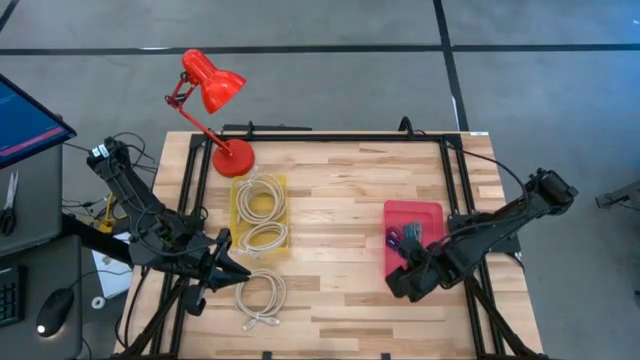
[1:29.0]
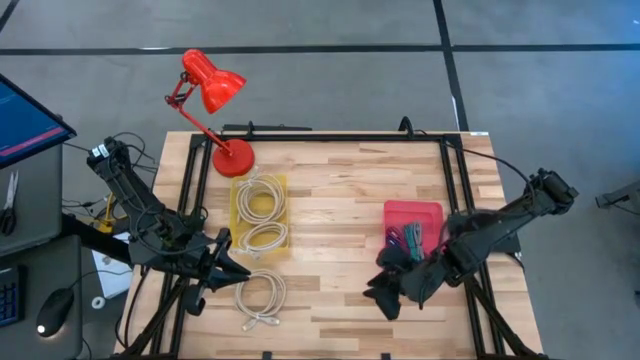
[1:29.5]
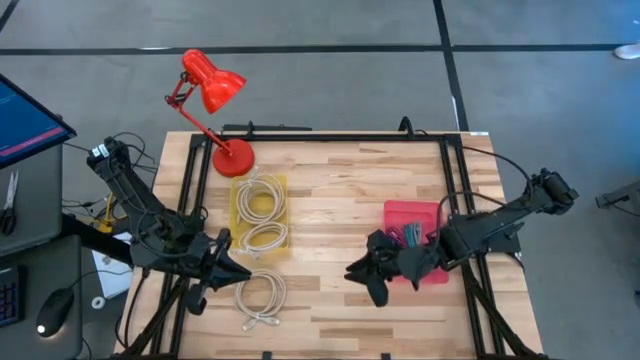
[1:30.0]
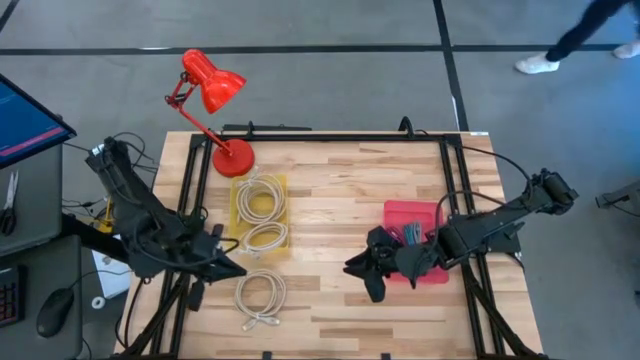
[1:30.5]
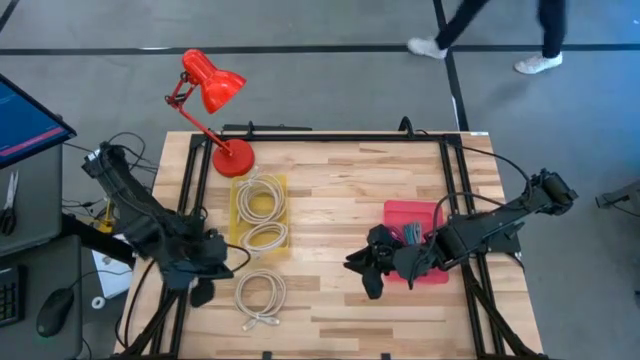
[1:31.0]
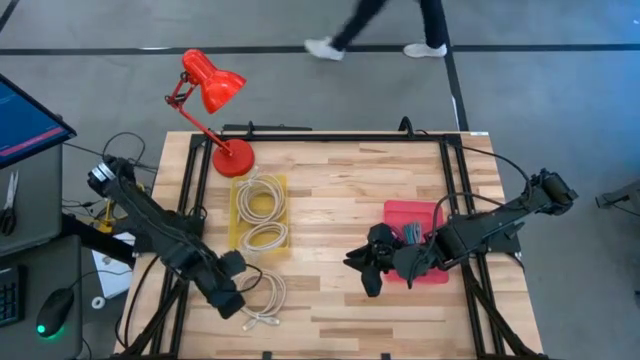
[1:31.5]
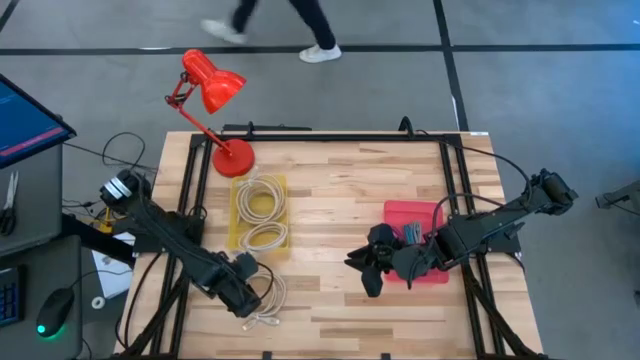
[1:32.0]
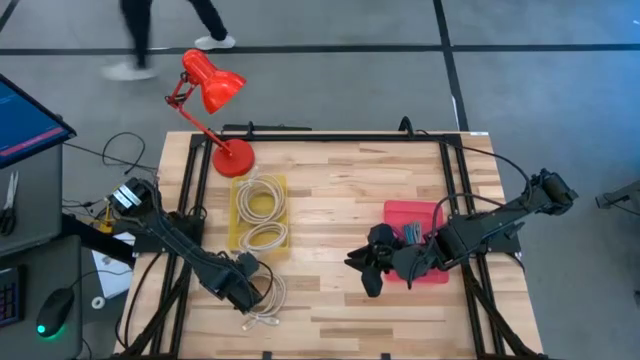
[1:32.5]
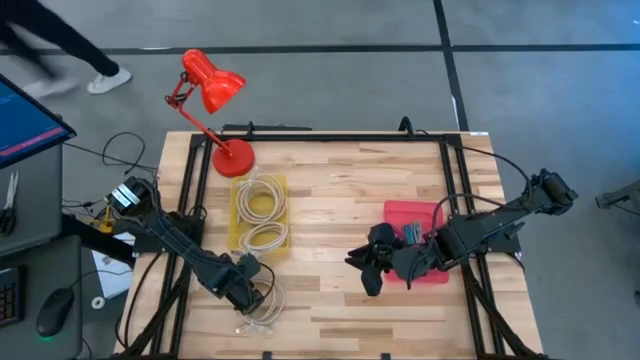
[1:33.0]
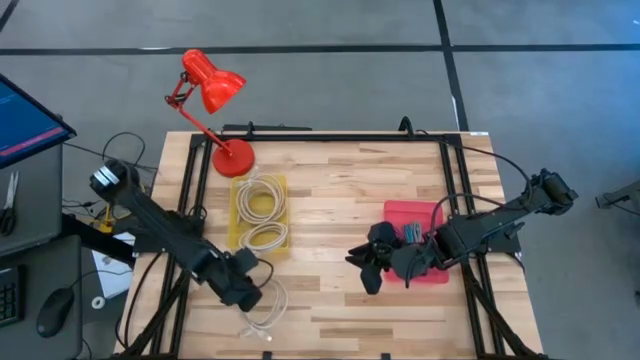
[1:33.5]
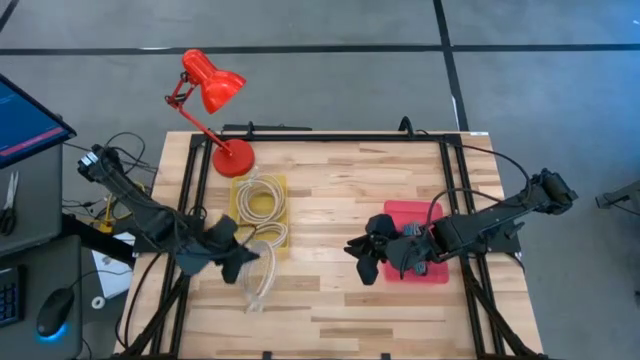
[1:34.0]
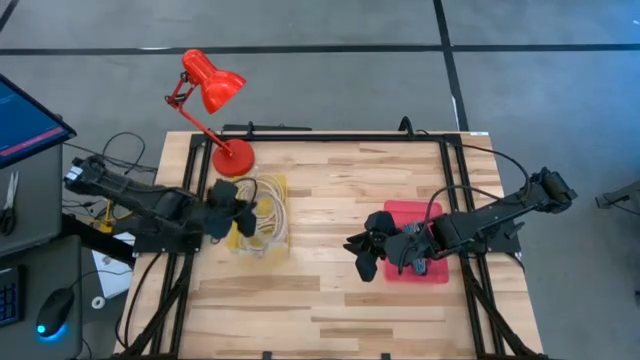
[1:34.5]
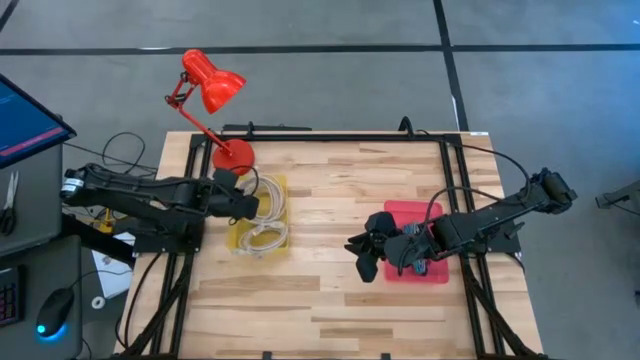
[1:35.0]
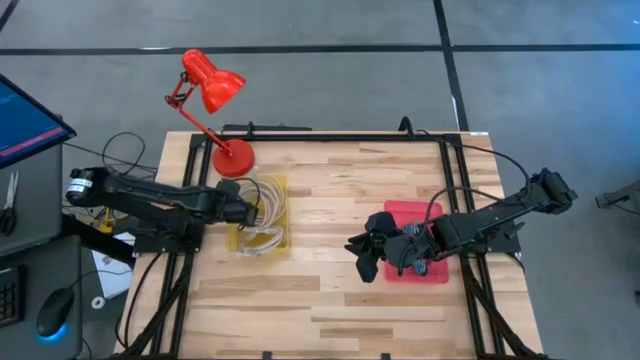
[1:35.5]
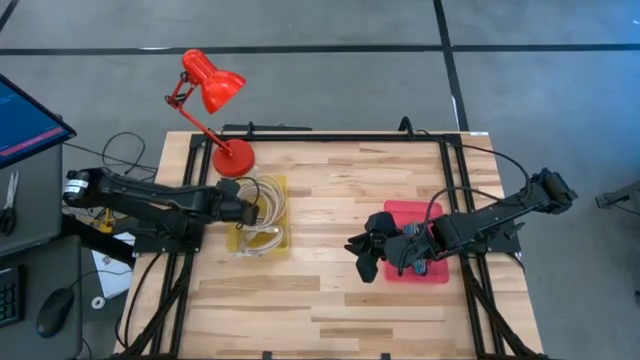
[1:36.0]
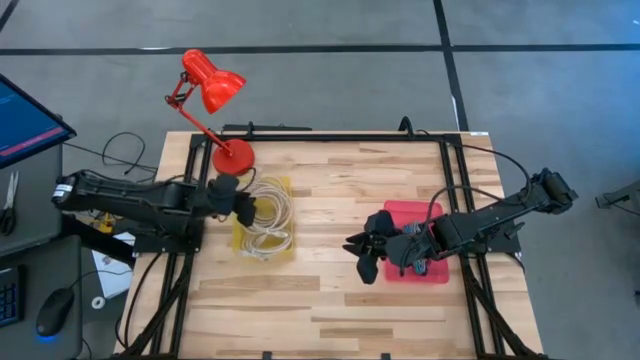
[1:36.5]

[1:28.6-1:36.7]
Task: Pick & Place USB Port
Put the brown HDMI cable into the yellow bin

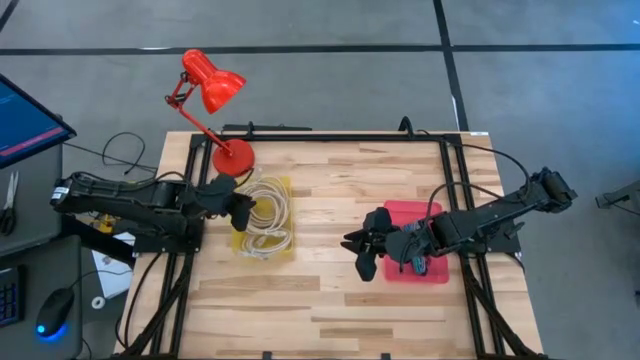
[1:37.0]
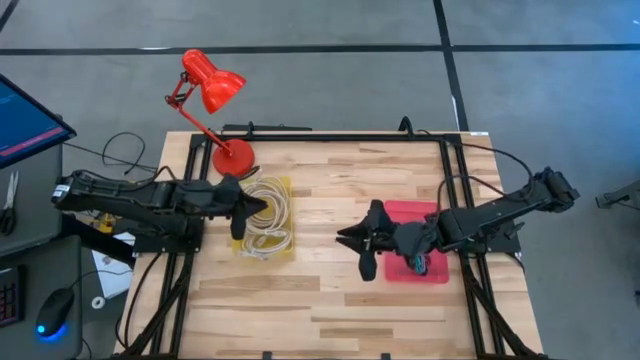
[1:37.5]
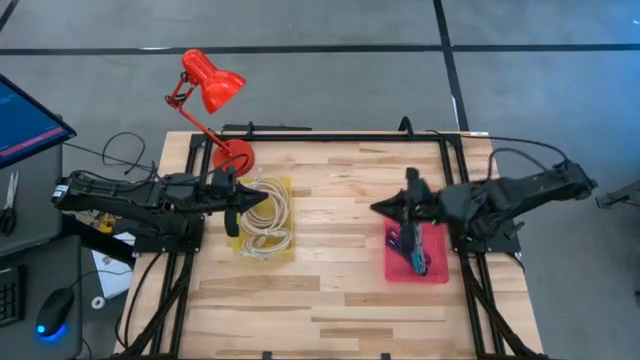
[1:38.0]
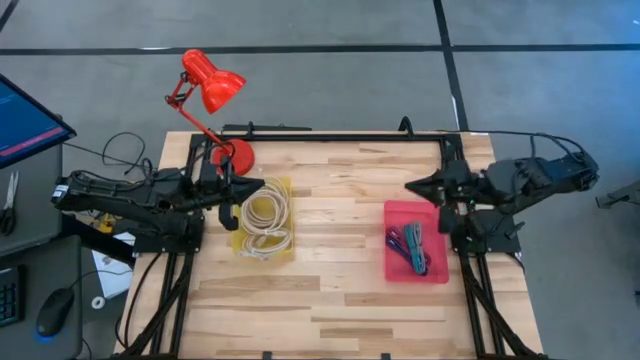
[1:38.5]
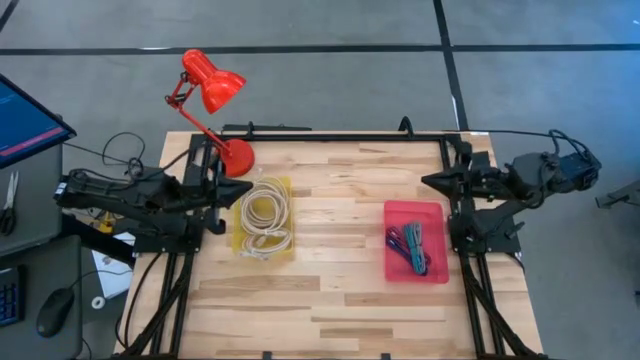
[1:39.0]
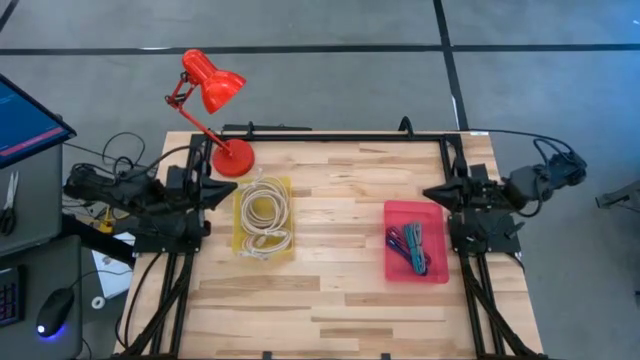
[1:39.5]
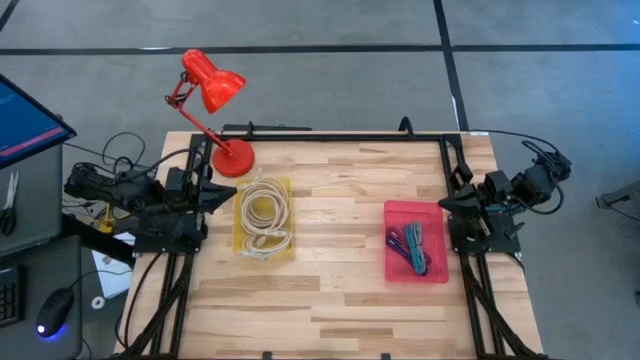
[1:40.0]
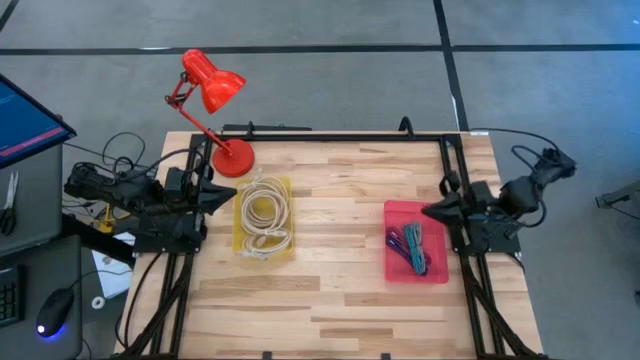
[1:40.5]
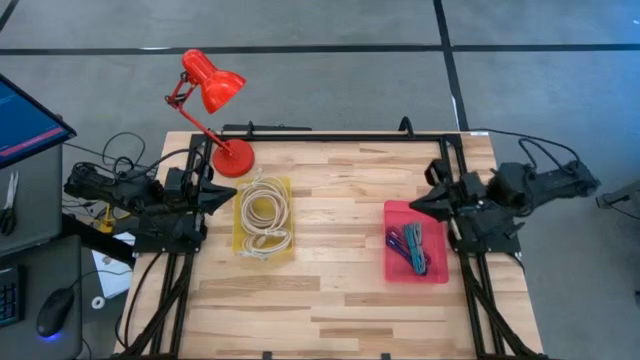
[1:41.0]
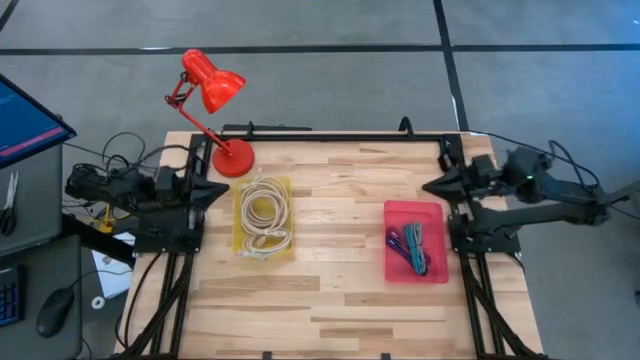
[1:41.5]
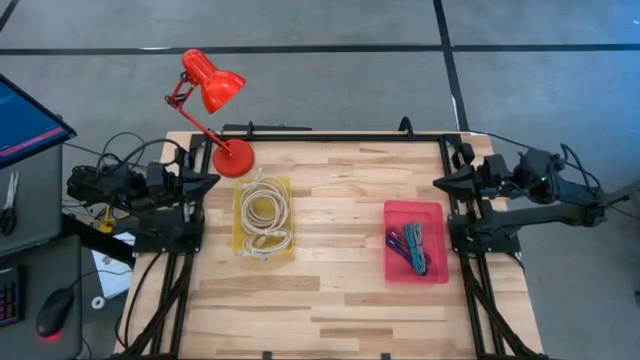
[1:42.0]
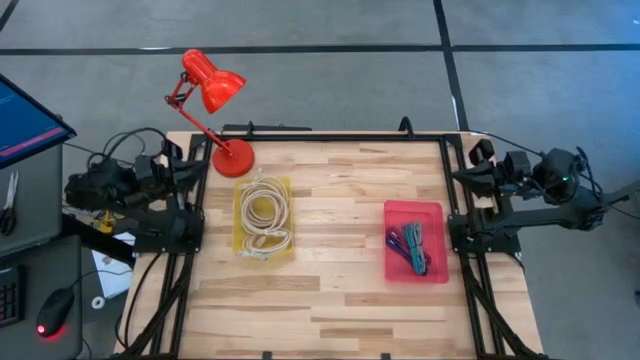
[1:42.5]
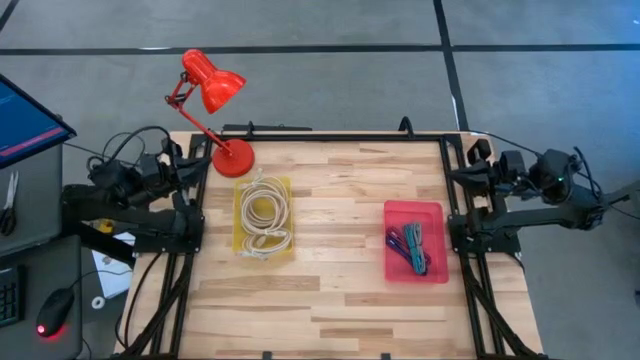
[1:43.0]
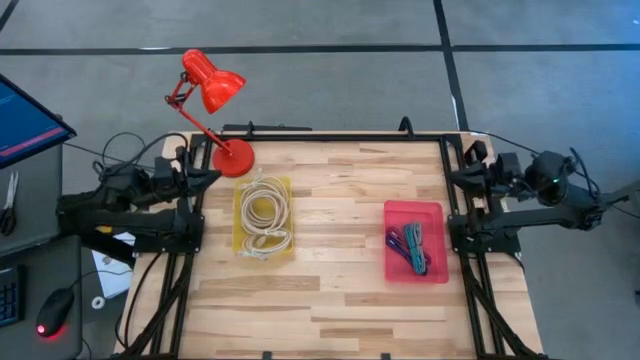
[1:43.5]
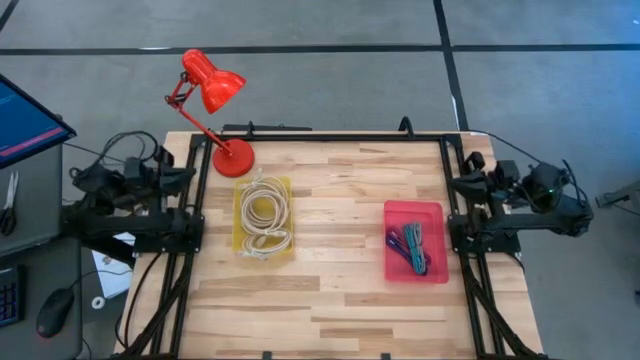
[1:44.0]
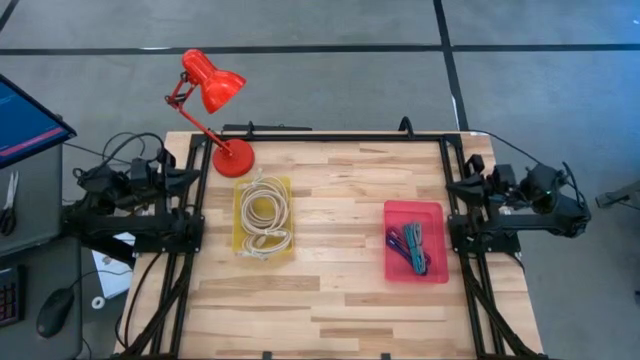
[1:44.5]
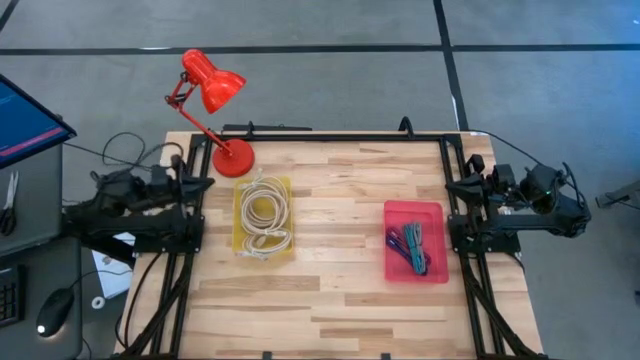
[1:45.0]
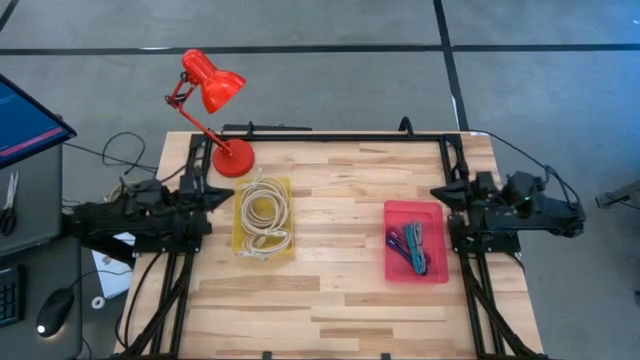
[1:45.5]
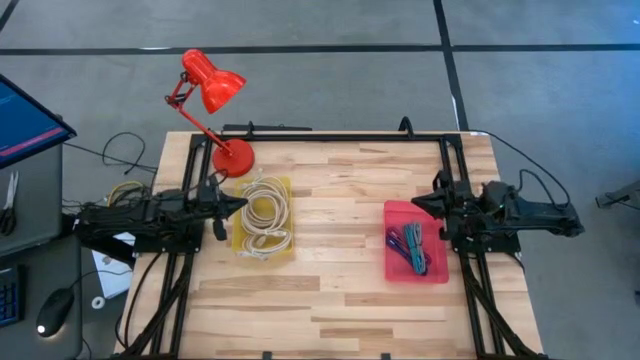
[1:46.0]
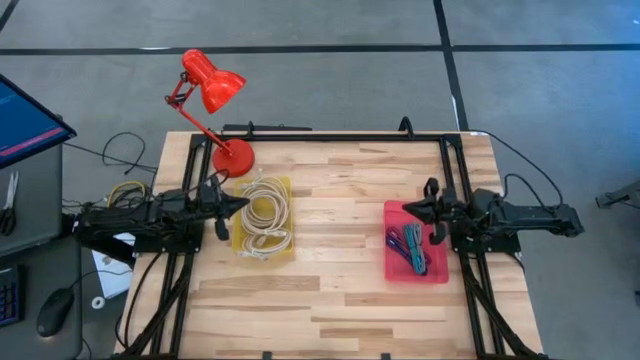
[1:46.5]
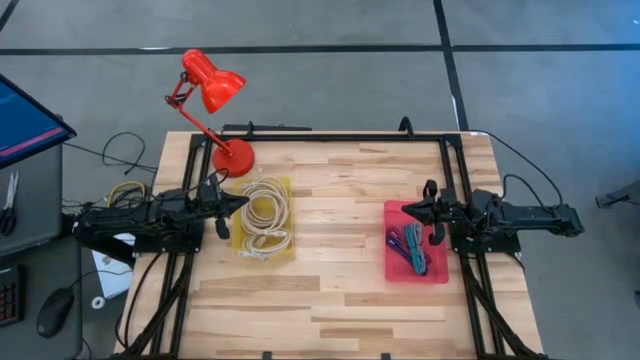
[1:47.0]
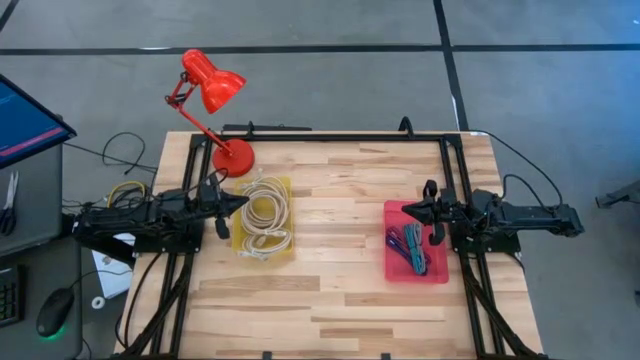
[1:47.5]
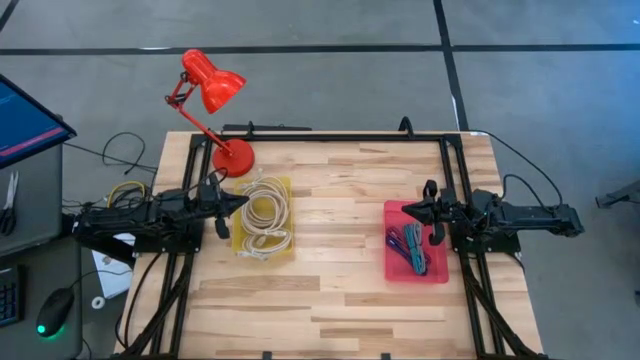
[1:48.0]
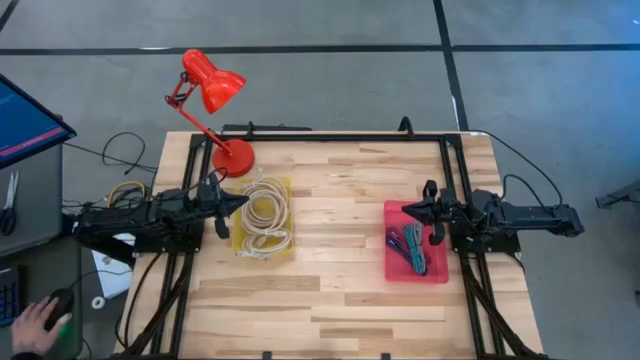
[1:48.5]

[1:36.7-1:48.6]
Return to Home Position

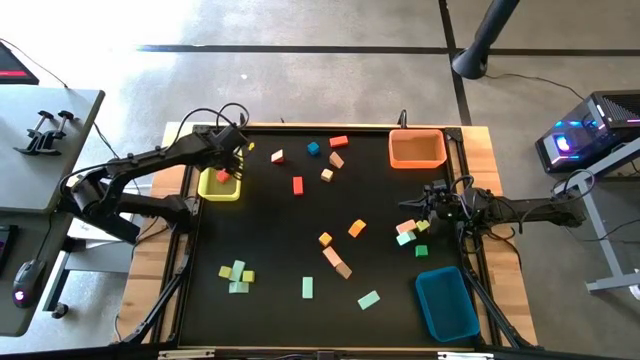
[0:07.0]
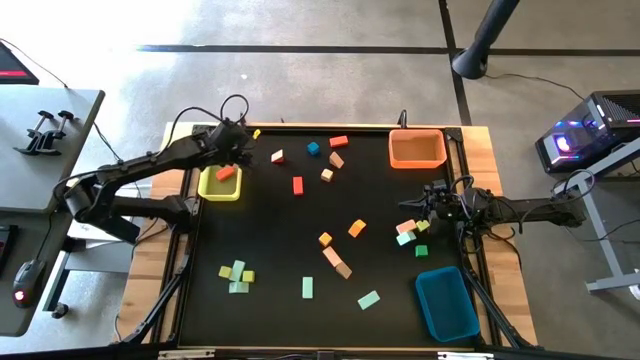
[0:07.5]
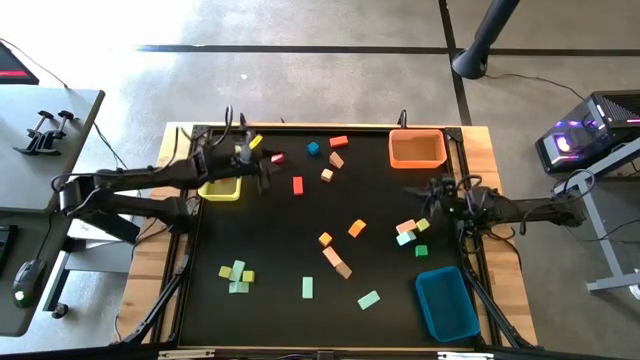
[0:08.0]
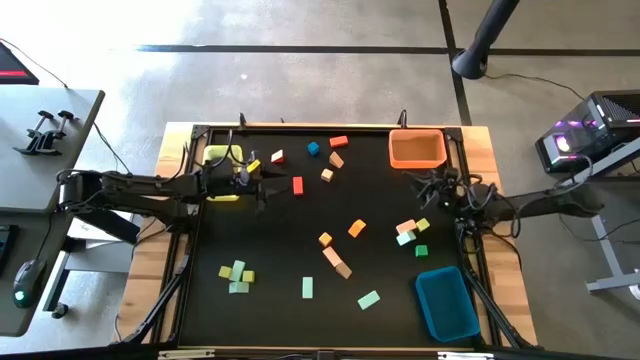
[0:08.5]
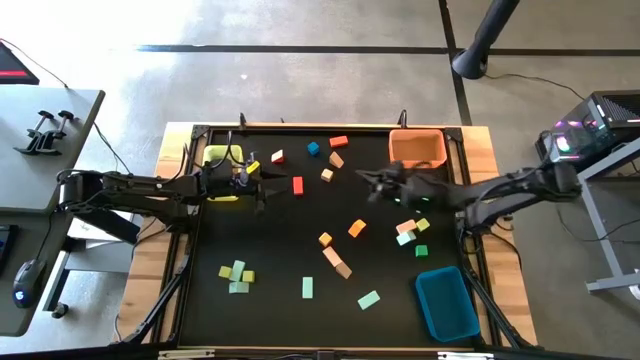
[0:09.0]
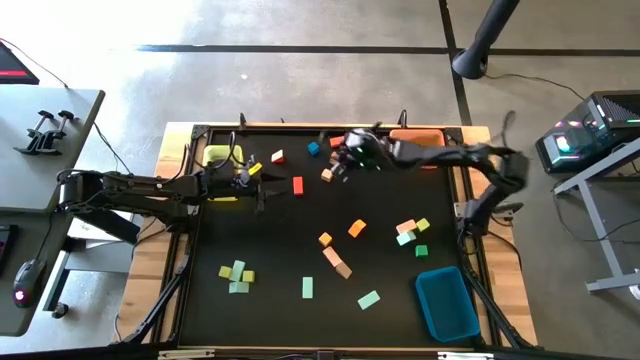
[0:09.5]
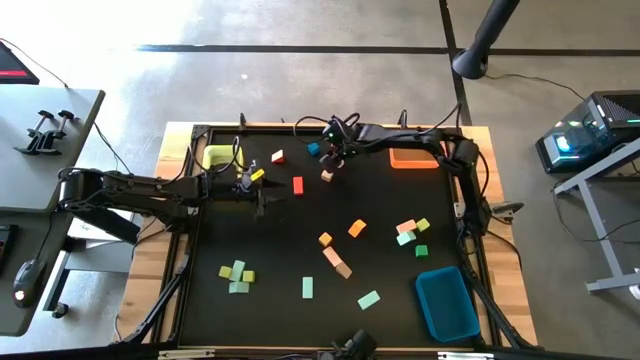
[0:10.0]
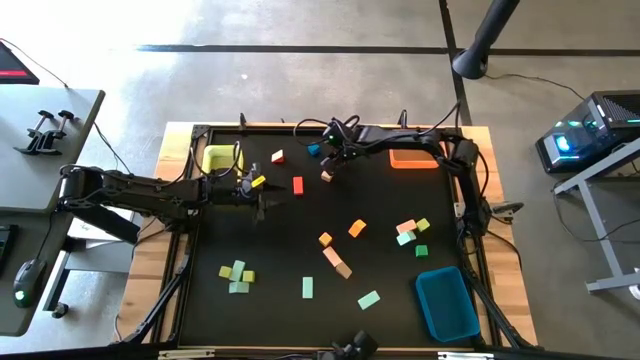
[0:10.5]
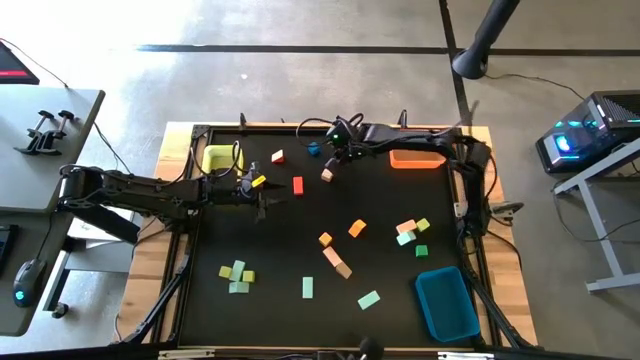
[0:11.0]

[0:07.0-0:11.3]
Task: Sort blocks by size
Put the light orange triangular block into the orange bin
